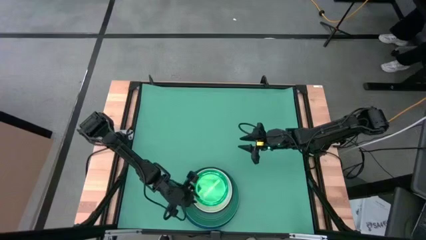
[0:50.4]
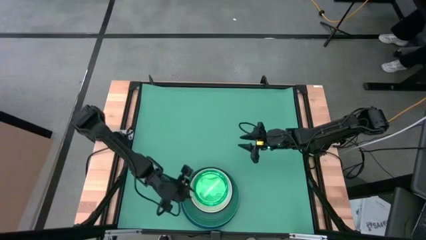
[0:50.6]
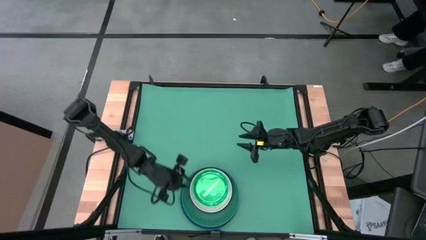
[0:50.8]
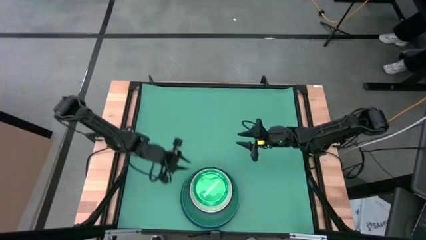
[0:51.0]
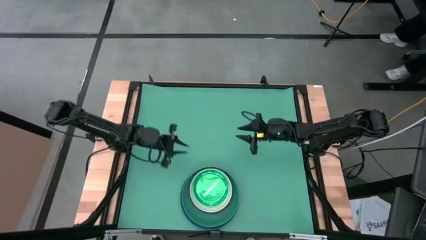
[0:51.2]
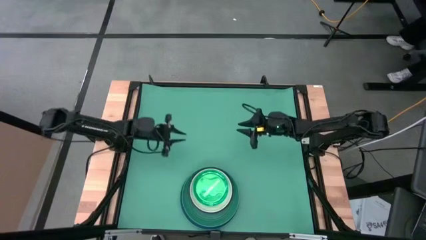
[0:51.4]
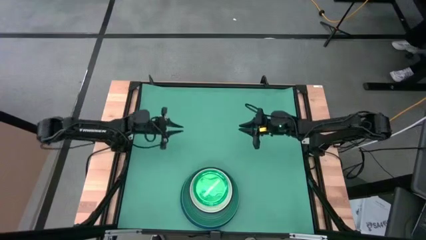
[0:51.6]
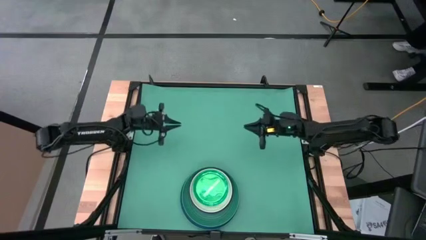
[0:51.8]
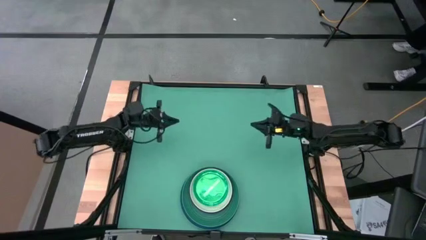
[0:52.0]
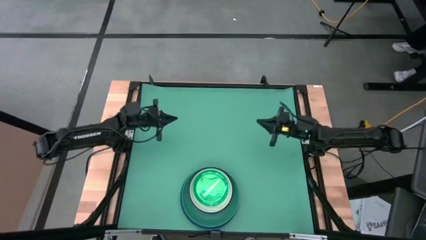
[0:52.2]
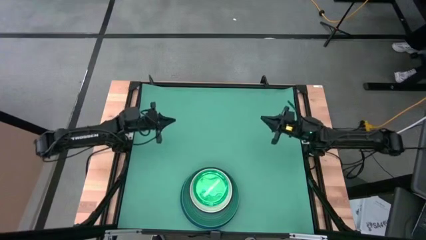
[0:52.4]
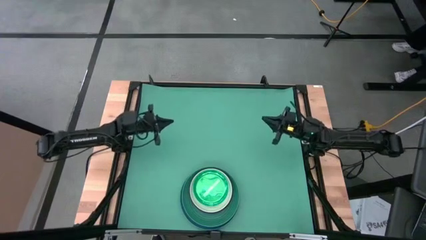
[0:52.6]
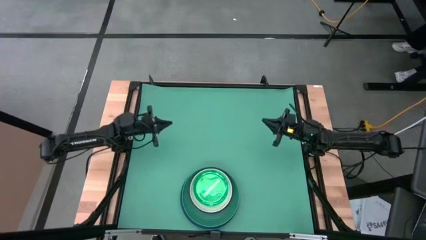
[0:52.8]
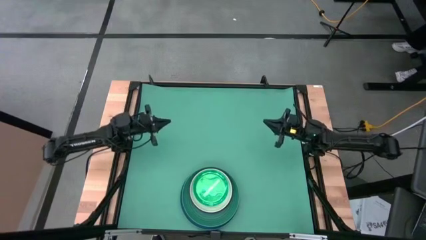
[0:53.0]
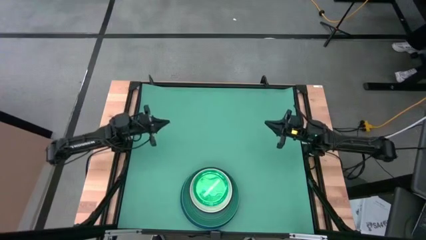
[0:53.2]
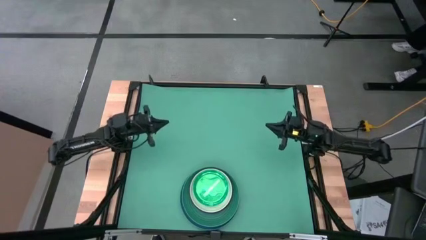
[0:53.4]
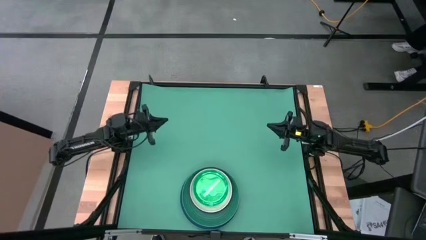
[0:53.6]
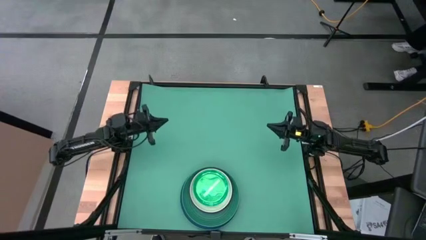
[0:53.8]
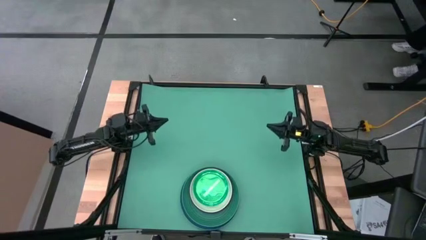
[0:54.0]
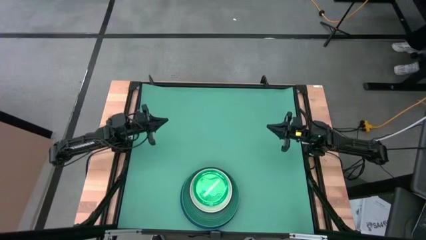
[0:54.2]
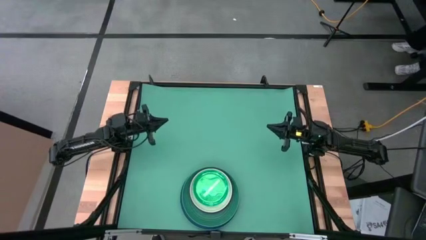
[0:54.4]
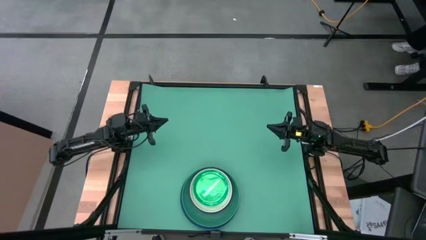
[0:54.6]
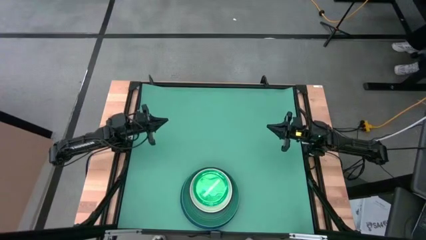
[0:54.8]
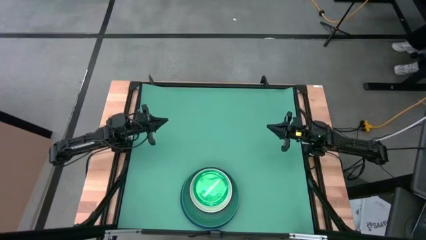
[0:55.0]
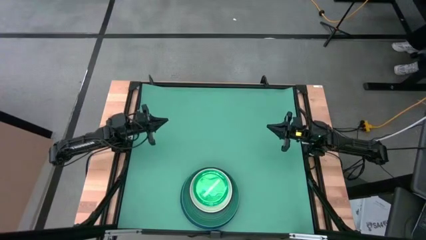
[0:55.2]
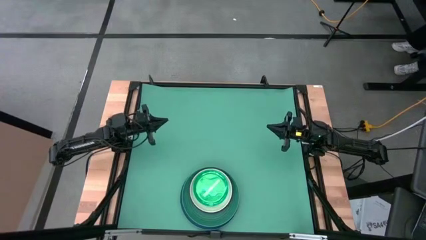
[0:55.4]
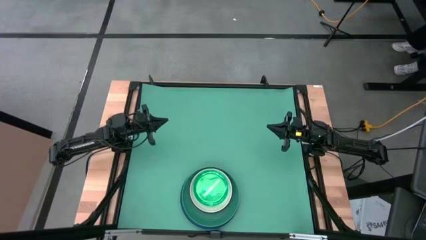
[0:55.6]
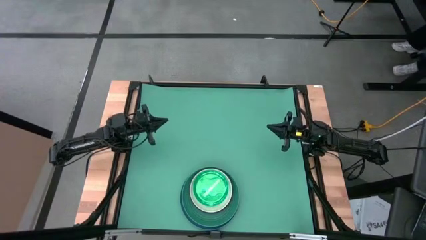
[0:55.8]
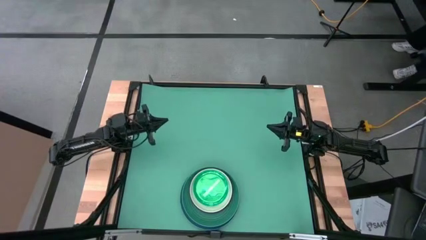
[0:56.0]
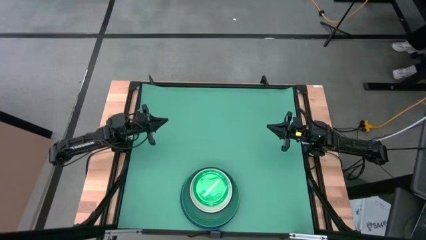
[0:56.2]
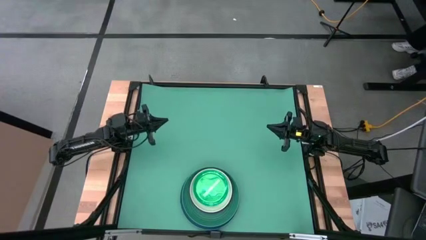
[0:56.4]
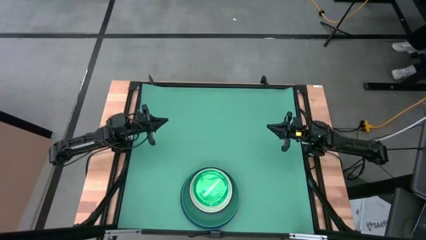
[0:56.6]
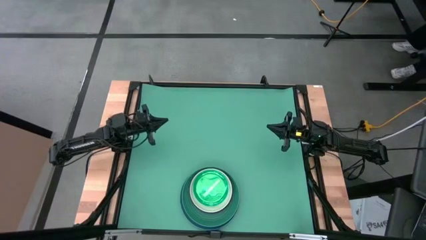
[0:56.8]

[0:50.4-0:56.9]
Task: Stack plastic plates
Return to Home Position

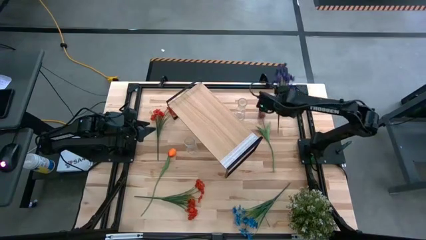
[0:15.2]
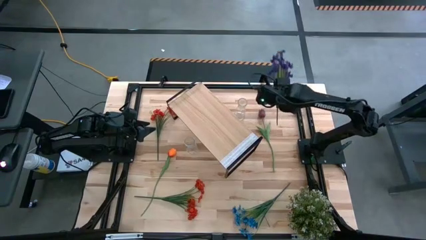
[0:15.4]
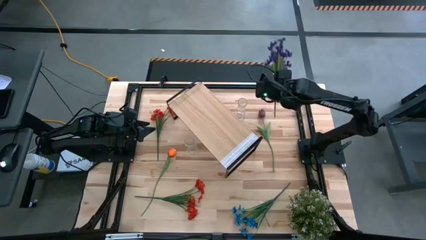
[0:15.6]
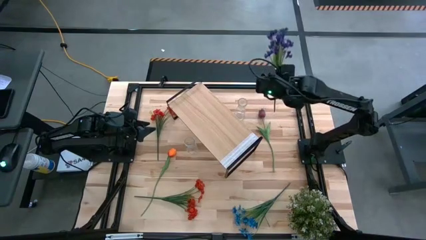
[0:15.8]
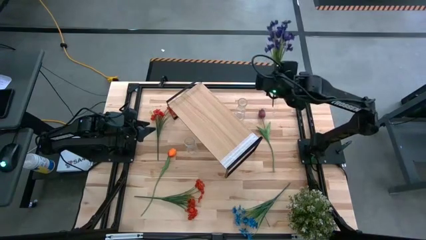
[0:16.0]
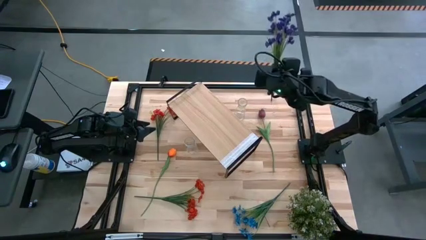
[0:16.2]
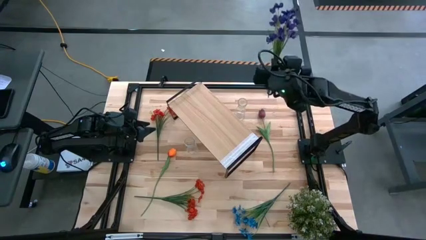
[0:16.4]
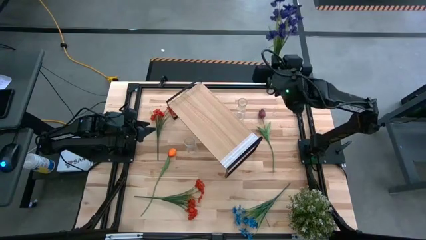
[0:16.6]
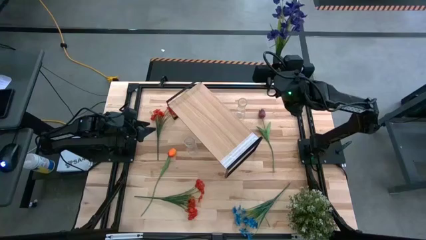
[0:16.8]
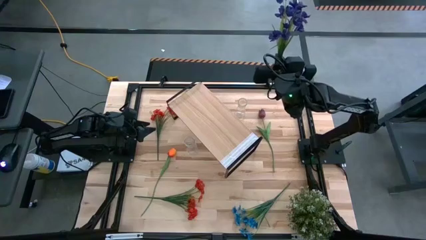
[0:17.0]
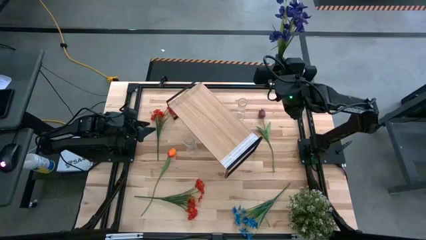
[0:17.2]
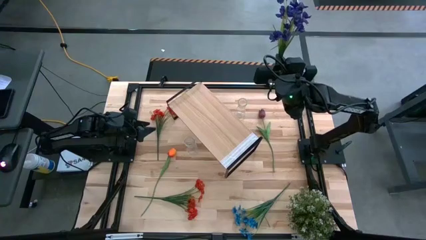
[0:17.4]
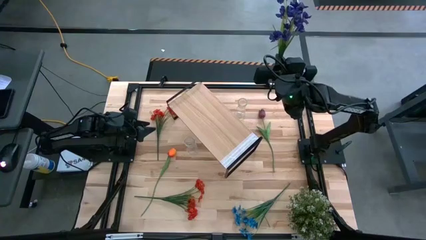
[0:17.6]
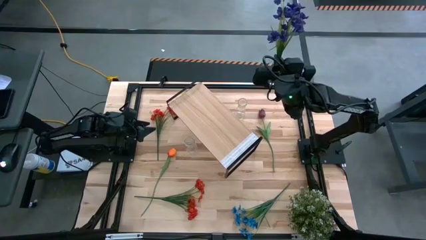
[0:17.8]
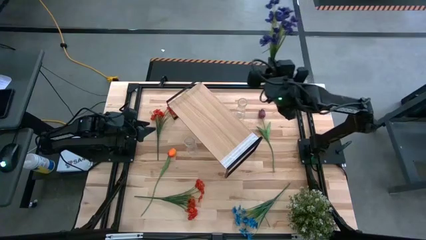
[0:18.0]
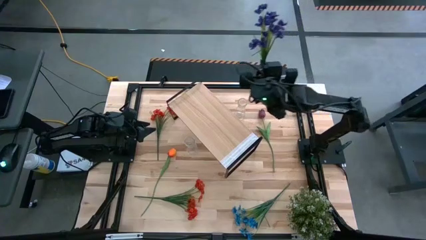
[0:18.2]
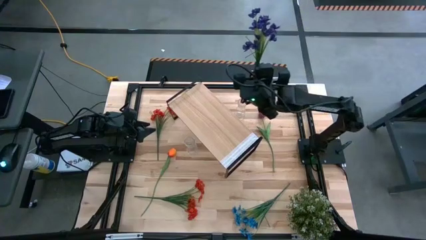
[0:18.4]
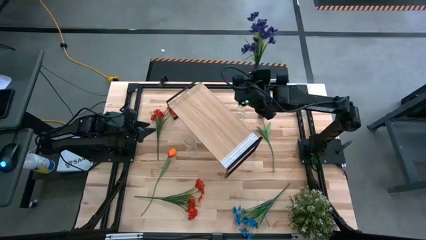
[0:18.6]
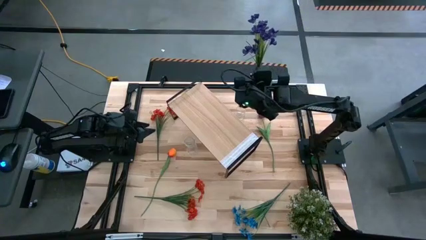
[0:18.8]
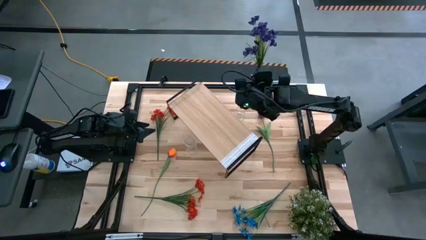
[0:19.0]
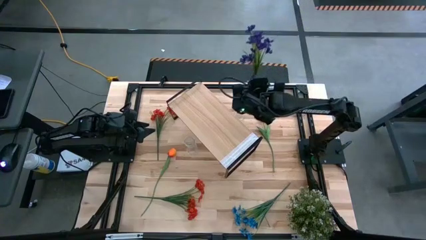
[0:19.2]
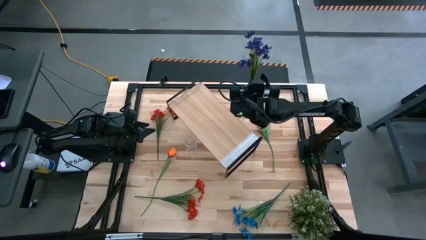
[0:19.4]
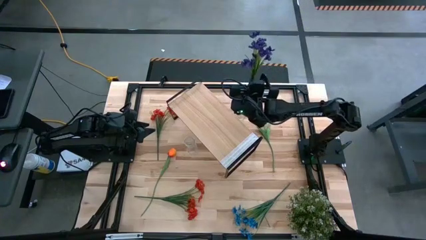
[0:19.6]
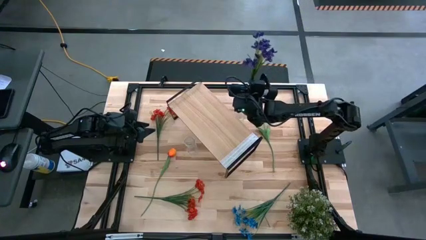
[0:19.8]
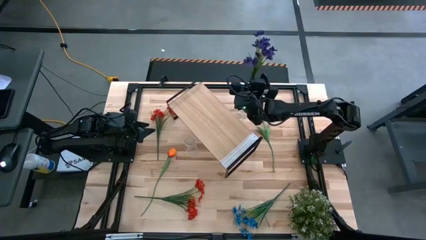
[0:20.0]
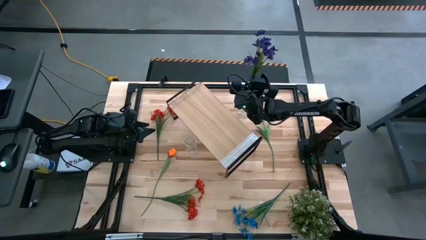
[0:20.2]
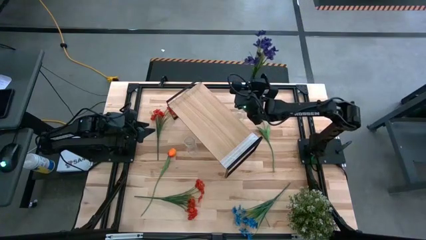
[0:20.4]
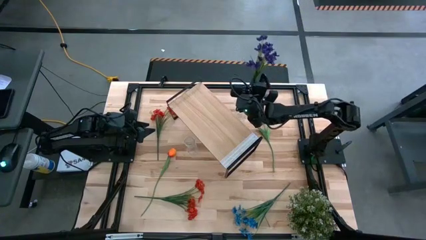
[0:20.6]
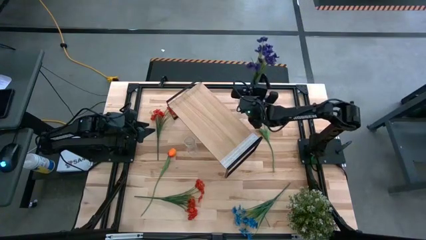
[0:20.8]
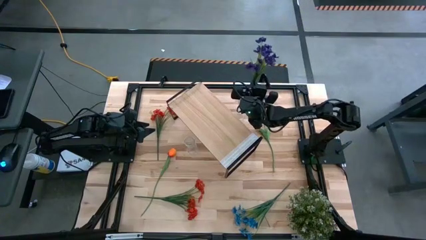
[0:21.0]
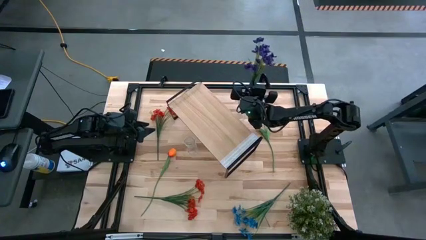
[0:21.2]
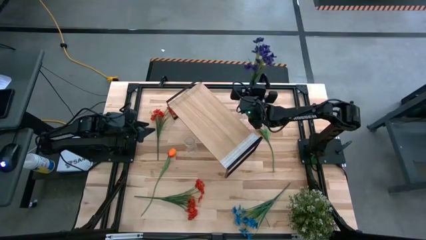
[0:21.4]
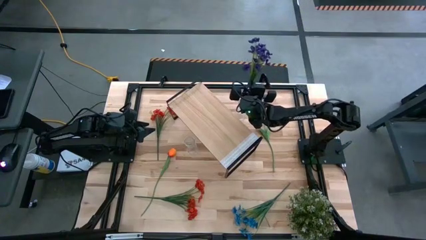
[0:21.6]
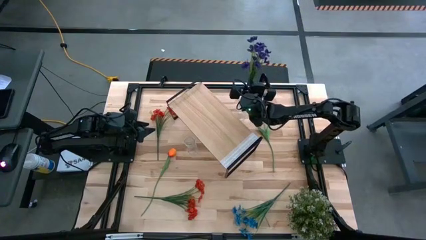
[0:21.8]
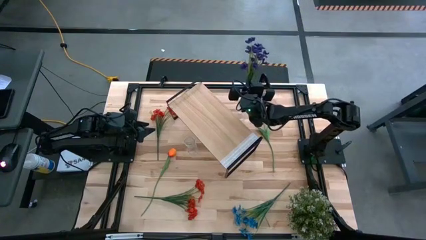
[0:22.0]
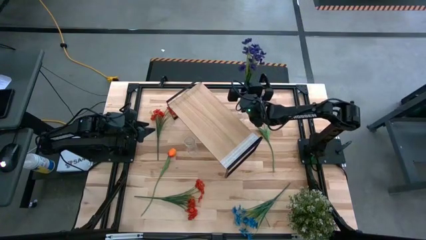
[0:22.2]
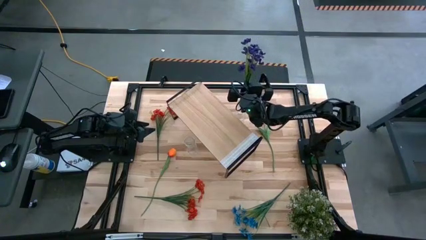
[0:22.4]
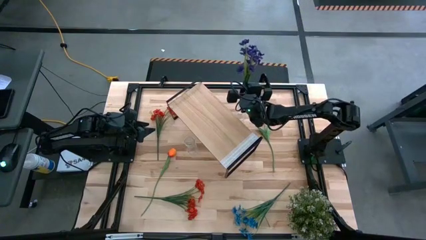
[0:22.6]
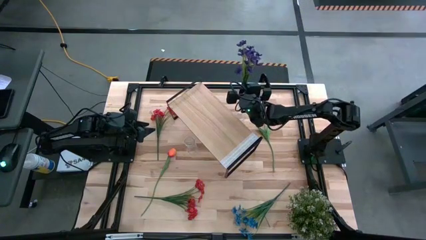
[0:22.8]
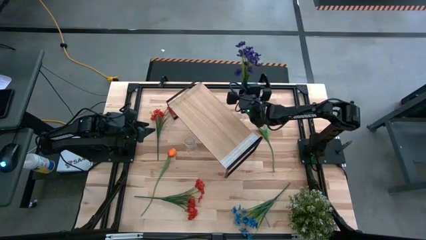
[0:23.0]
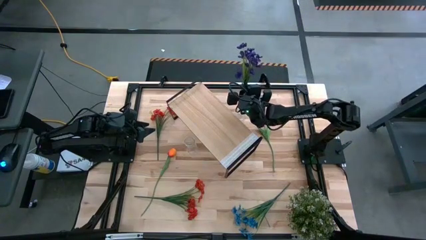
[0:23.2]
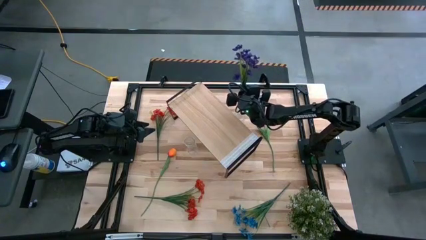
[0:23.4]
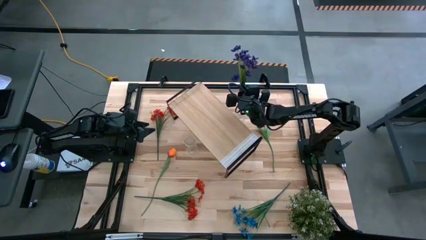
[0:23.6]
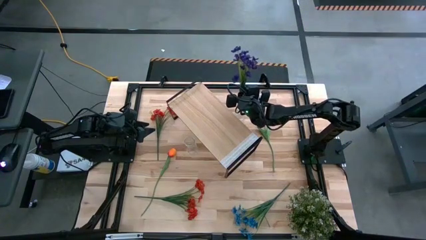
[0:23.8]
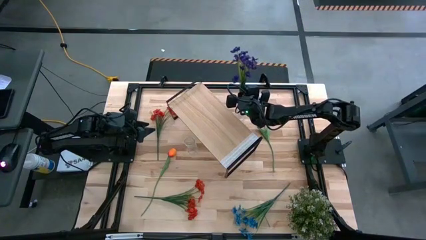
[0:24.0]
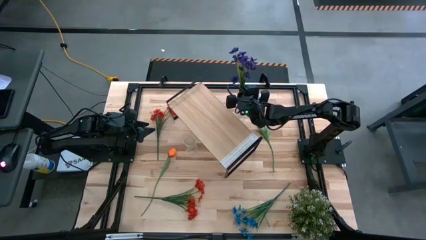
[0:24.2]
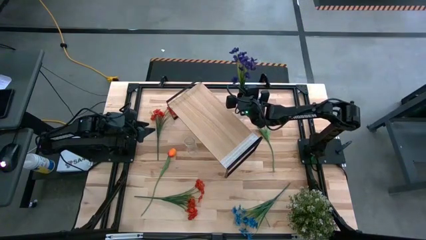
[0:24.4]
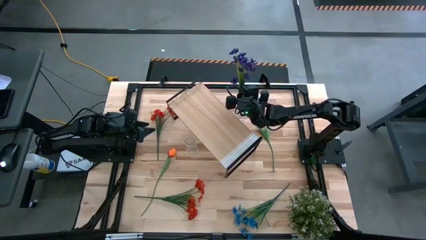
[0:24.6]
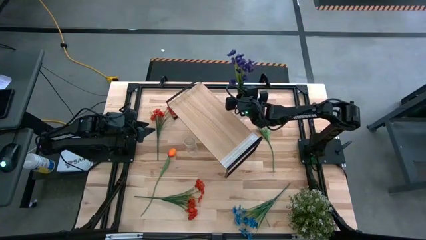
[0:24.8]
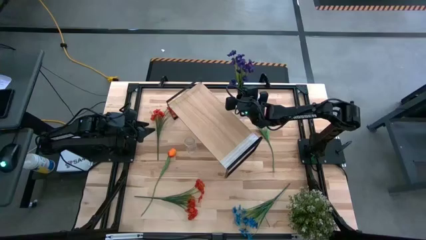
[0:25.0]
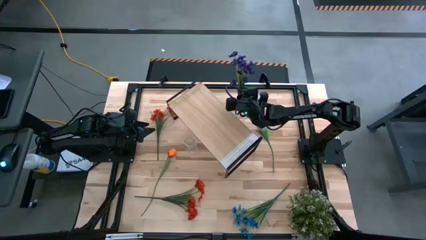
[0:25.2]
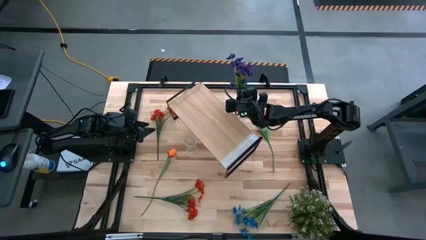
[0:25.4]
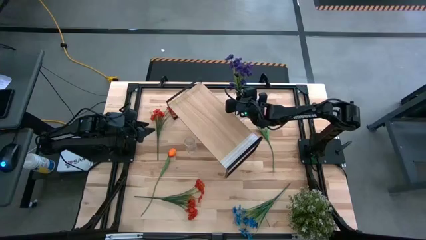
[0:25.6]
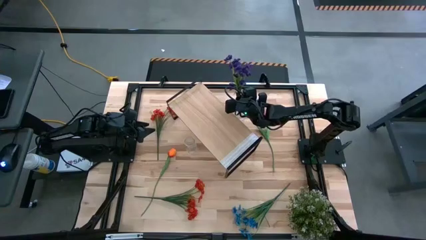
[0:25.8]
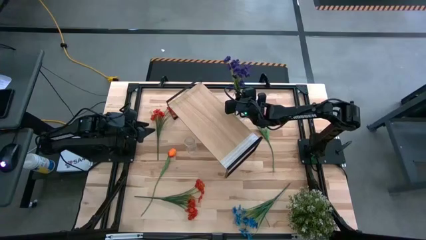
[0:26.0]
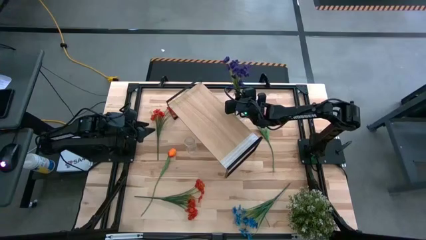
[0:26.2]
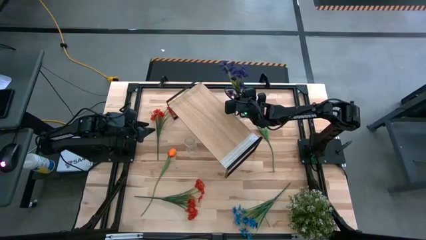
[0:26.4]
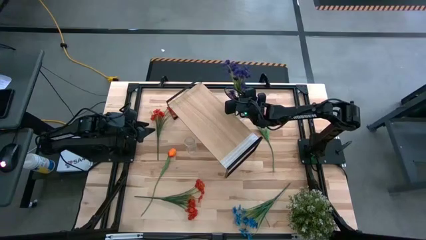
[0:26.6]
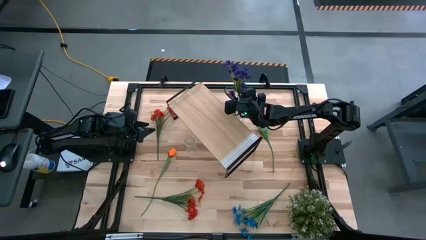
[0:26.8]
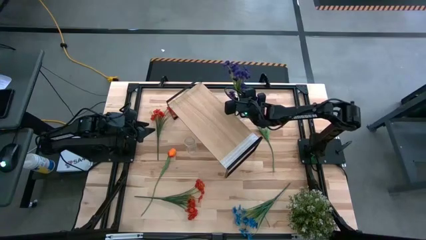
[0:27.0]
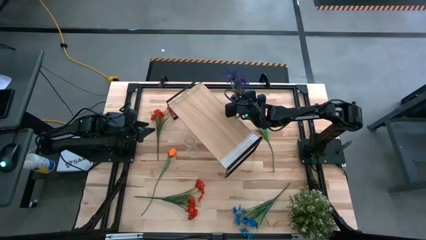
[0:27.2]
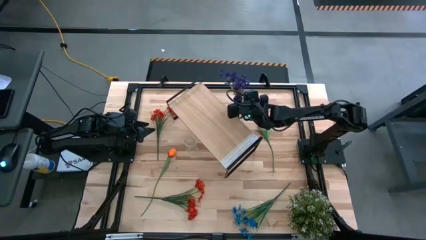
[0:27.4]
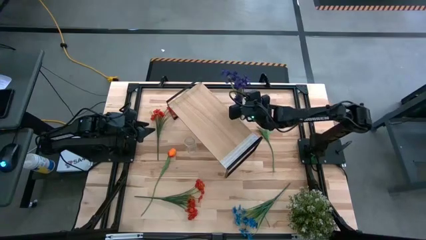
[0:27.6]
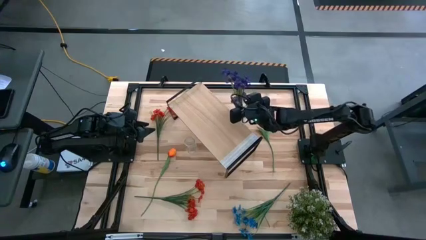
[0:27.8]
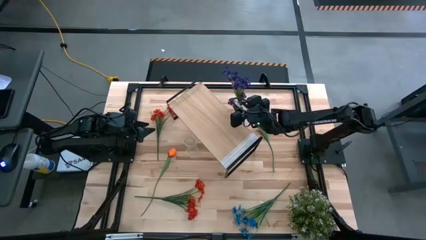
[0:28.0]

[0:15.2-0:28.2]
Task: Pick and place flowers into a vace then onto a shelf
Put the violet flowers into the top transparent vase
